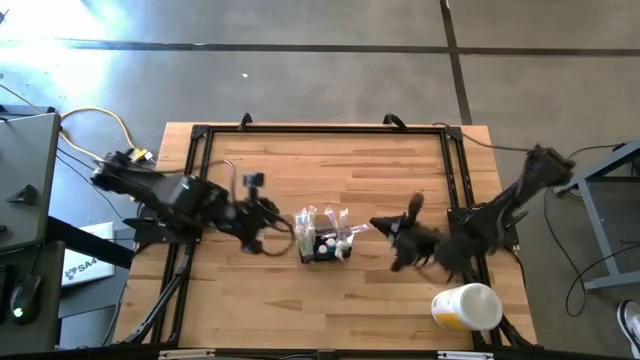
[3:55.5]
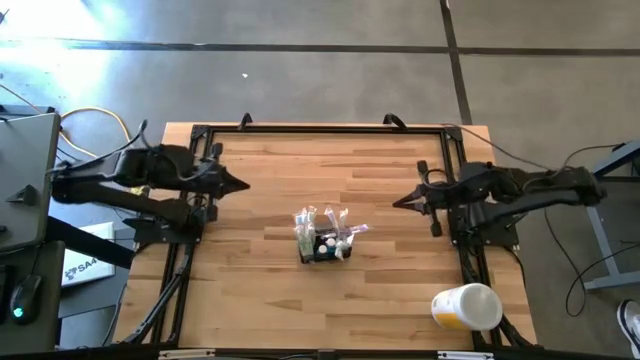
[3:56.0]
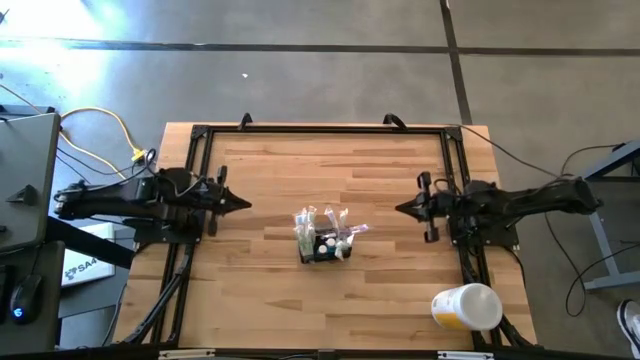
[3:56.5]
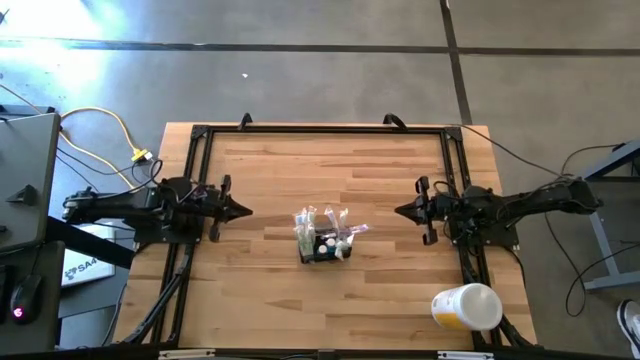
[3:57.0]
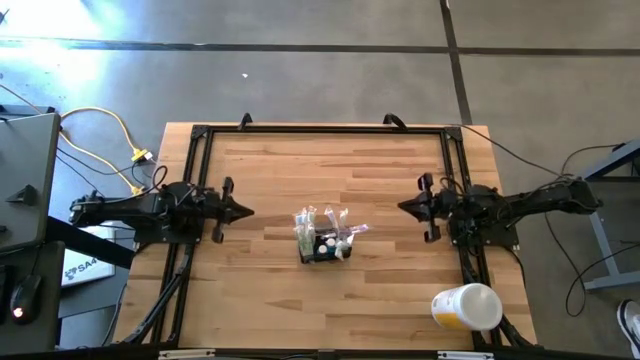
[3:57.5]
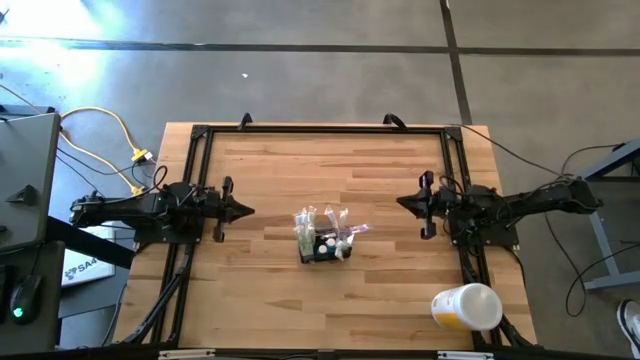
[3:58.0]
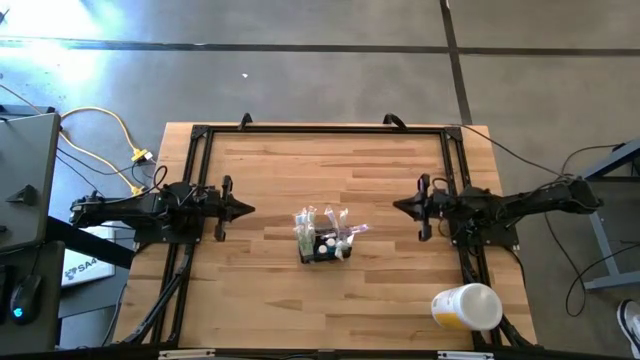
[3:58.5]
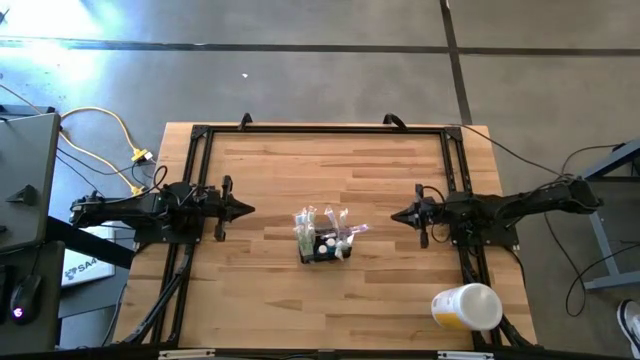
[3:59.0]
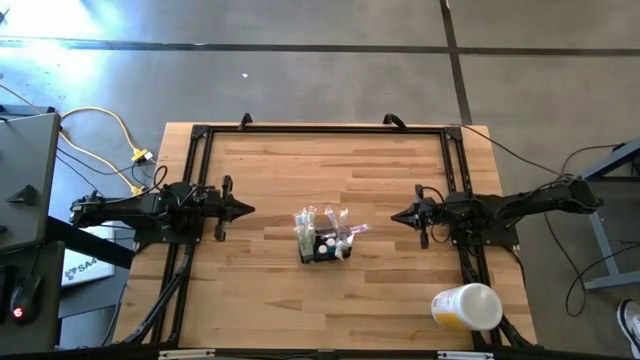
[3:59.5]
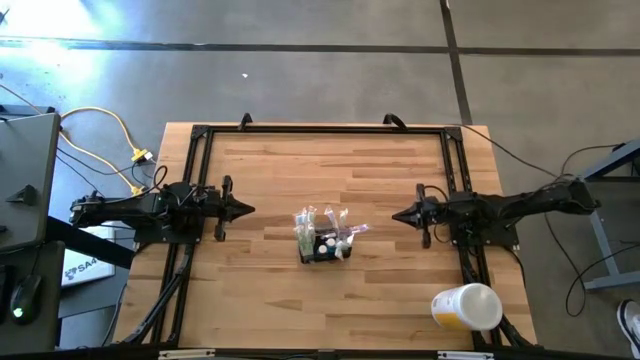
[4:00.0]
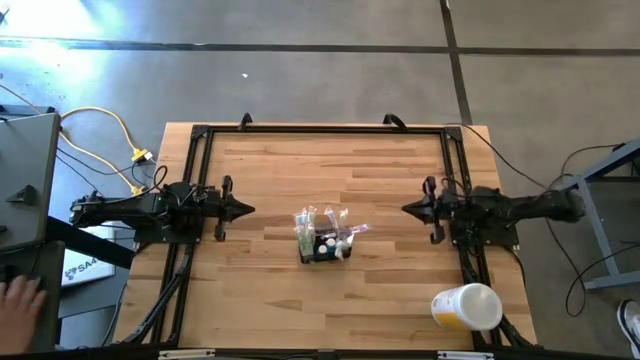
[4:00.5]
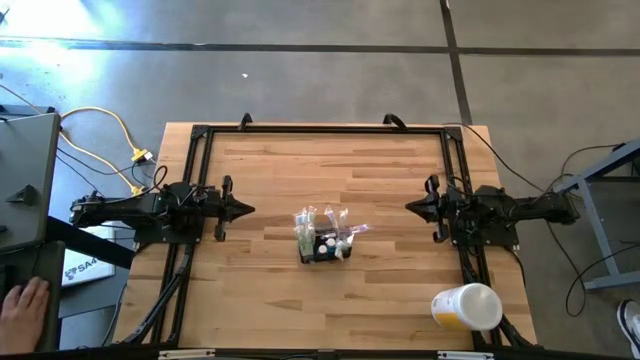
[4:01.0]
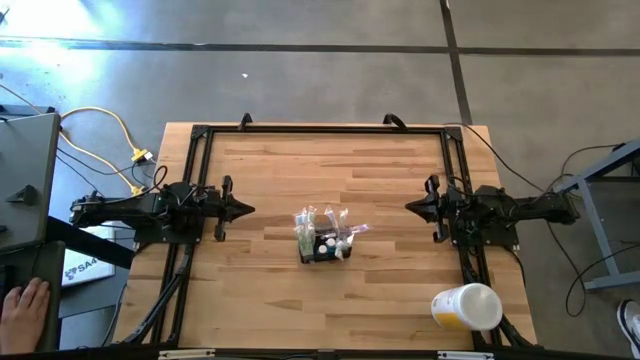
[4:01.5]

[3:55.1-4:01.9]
Task: Pick & Place toothbrushing station
Return to Home Position

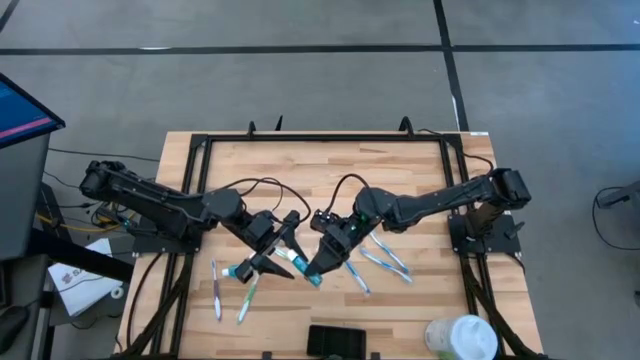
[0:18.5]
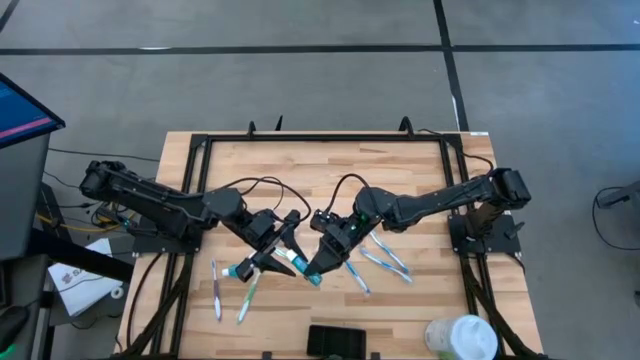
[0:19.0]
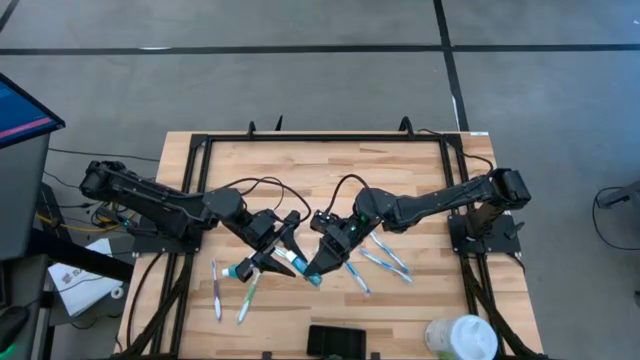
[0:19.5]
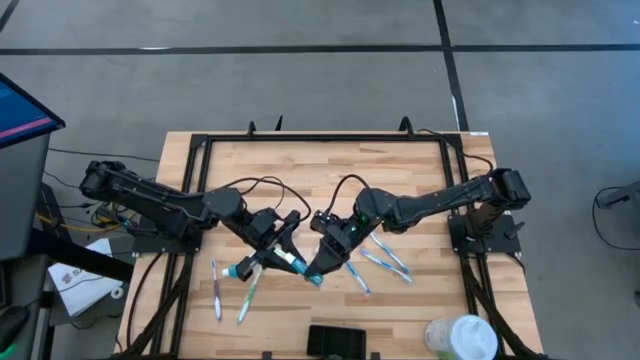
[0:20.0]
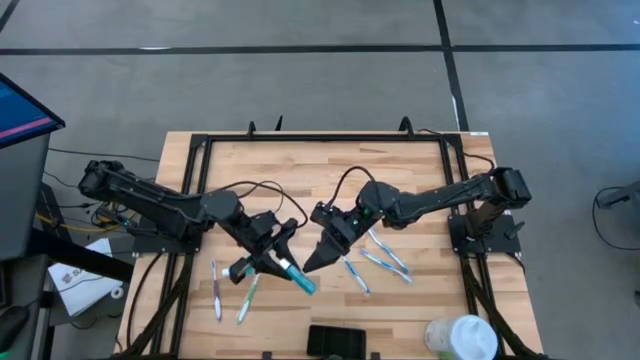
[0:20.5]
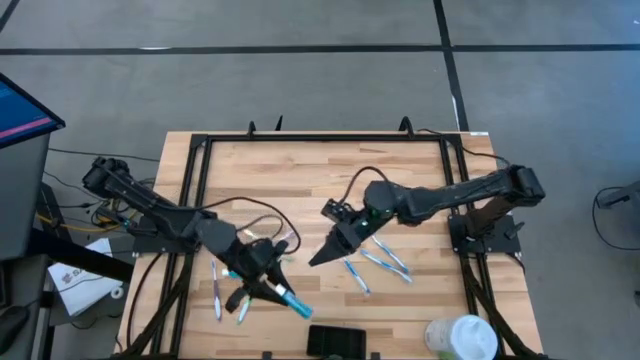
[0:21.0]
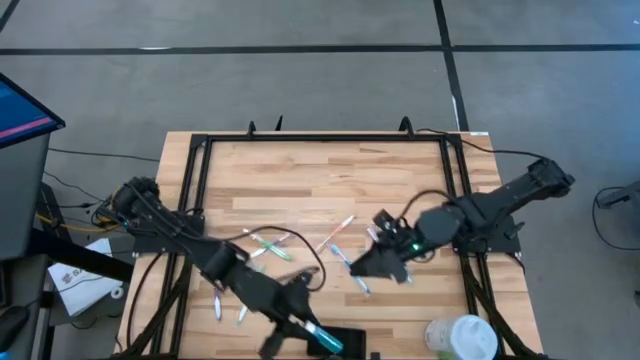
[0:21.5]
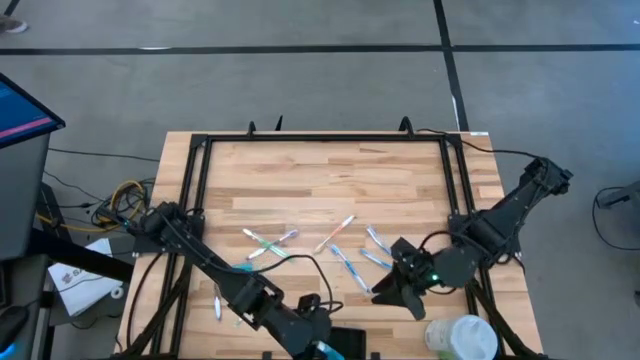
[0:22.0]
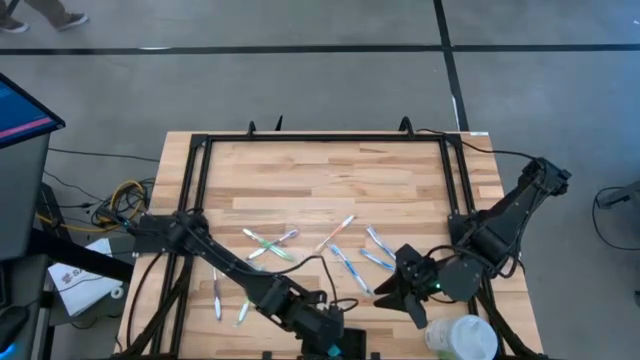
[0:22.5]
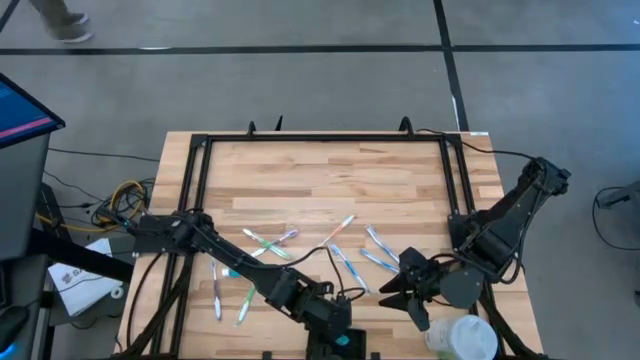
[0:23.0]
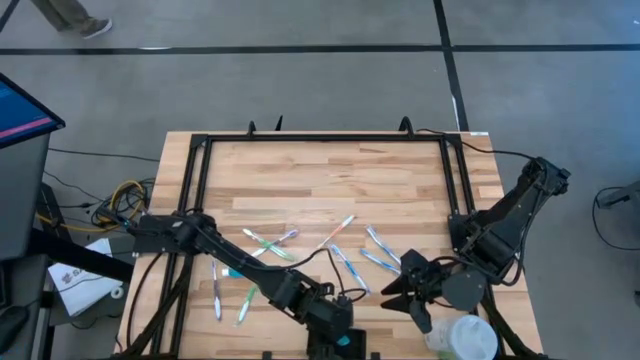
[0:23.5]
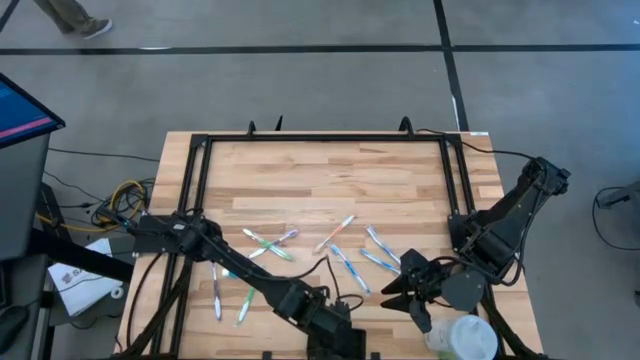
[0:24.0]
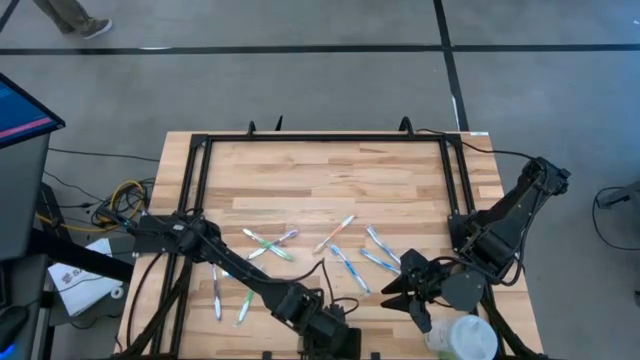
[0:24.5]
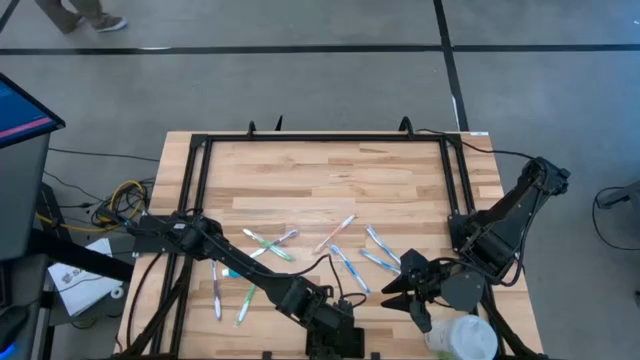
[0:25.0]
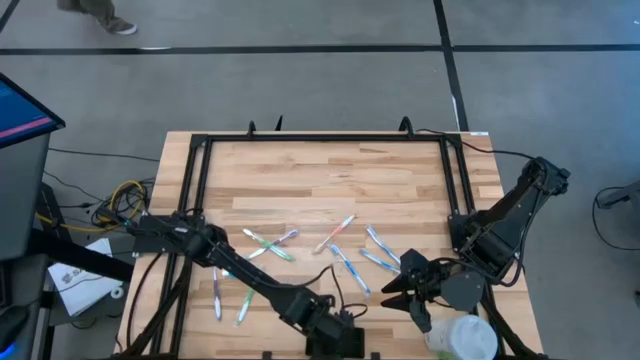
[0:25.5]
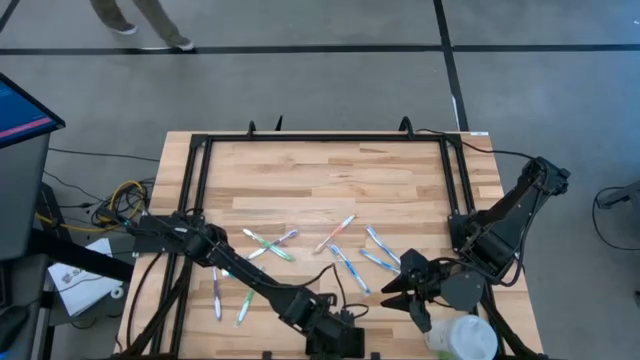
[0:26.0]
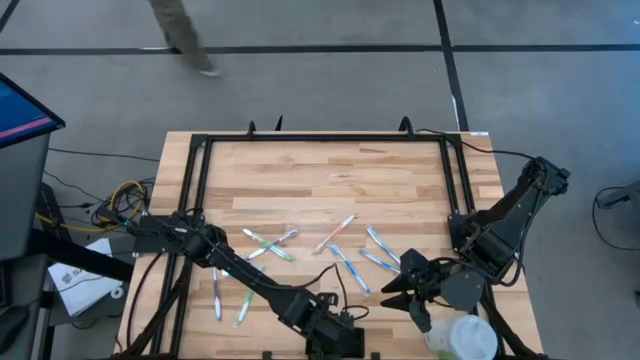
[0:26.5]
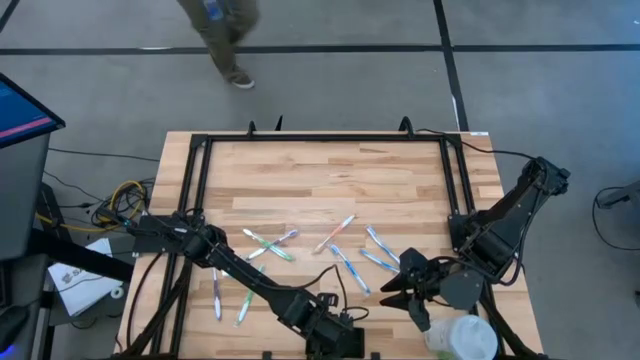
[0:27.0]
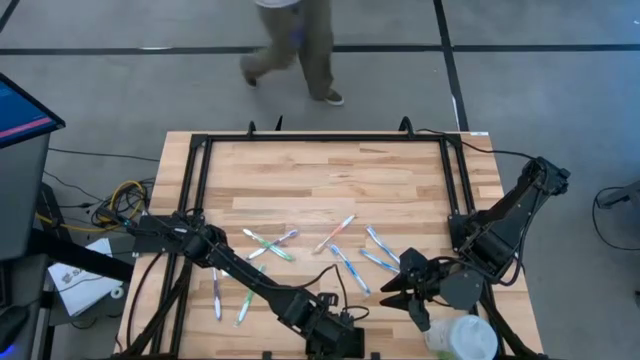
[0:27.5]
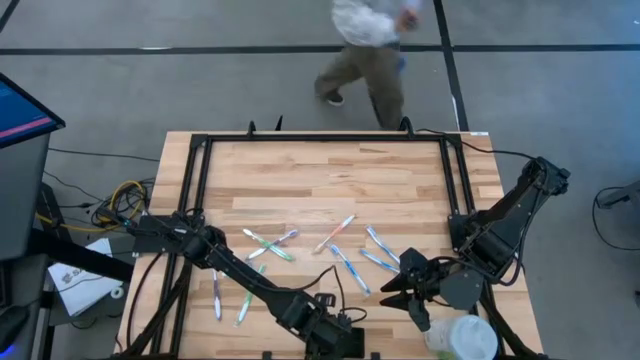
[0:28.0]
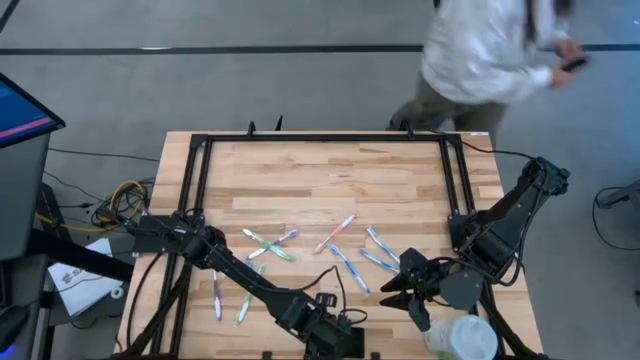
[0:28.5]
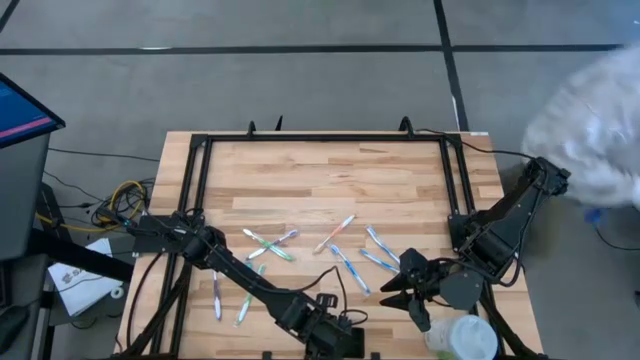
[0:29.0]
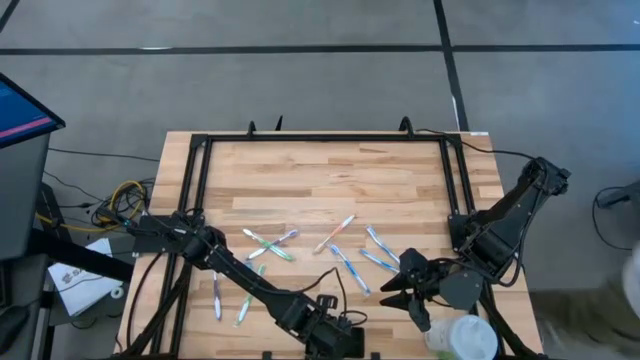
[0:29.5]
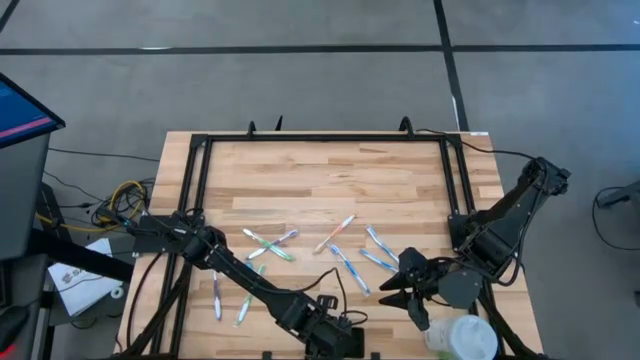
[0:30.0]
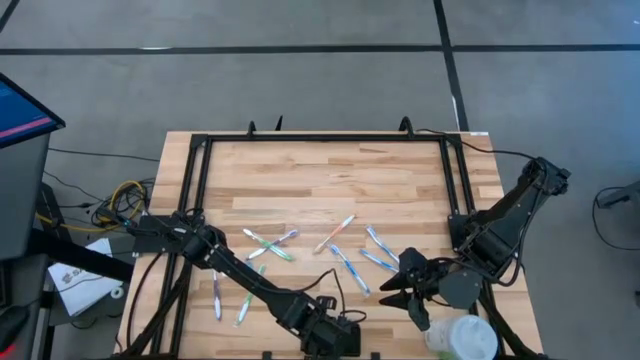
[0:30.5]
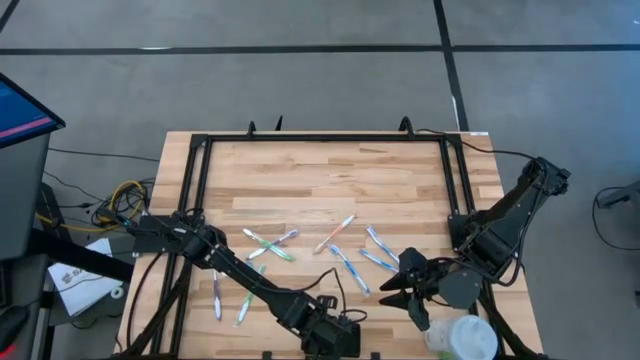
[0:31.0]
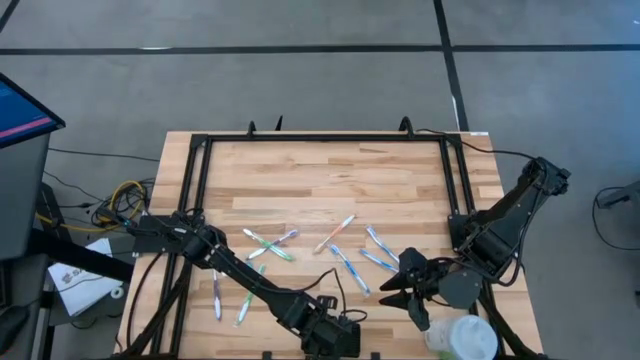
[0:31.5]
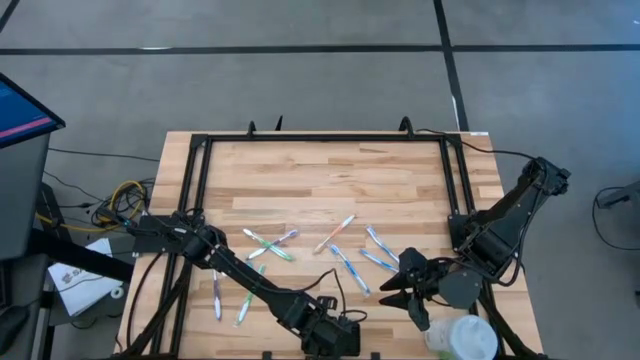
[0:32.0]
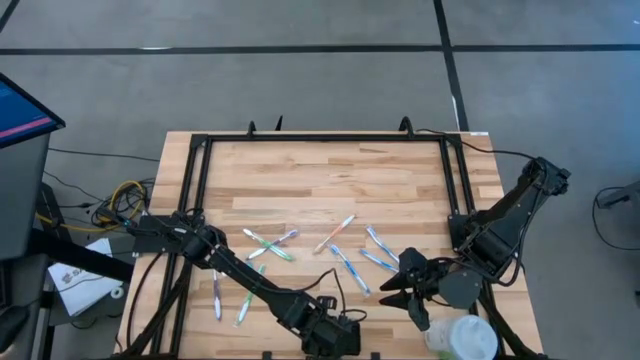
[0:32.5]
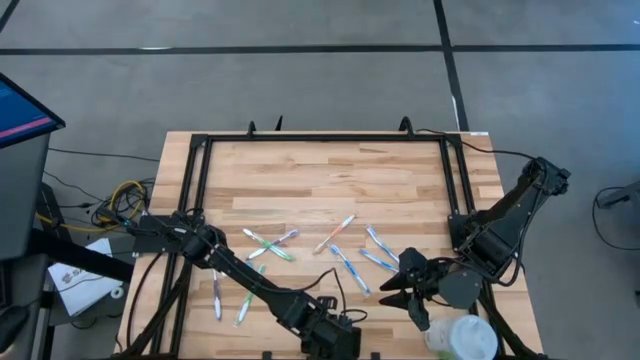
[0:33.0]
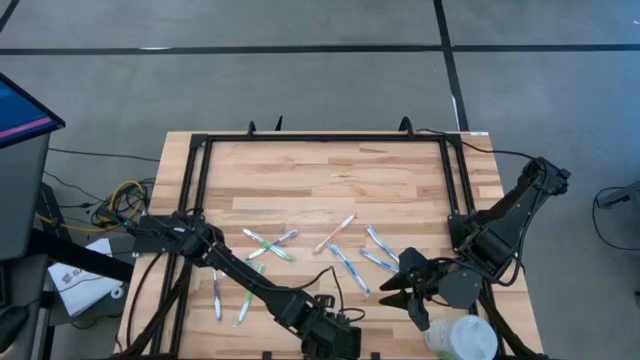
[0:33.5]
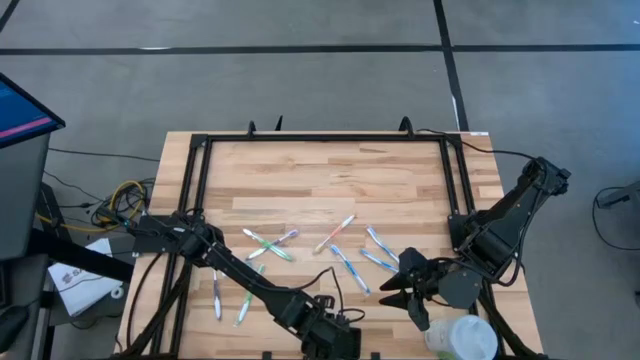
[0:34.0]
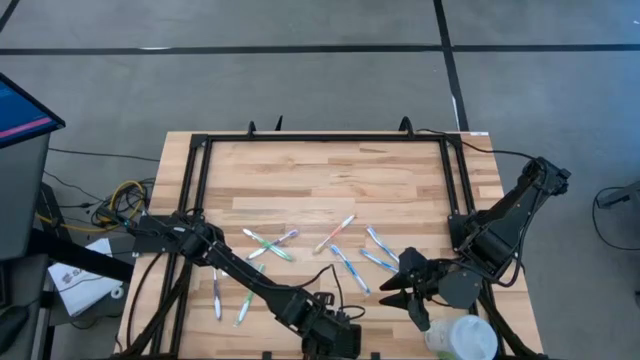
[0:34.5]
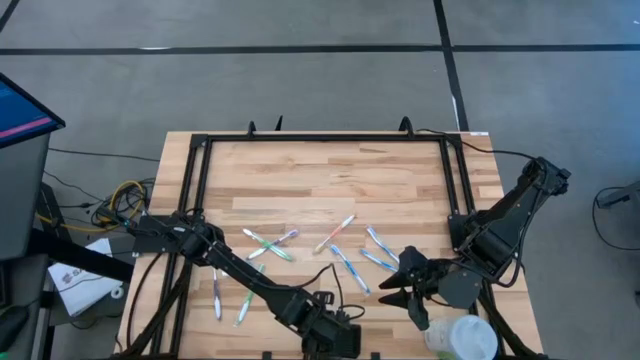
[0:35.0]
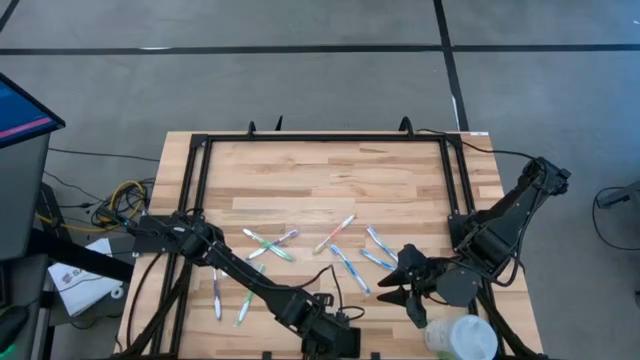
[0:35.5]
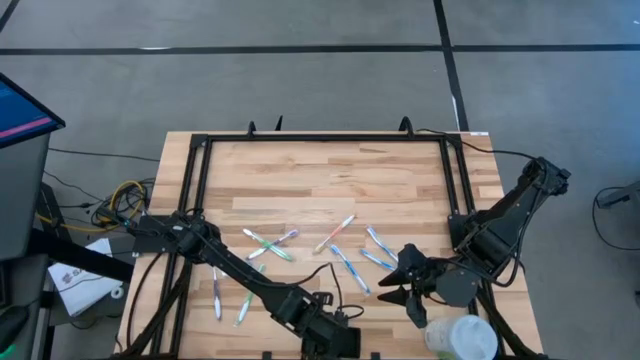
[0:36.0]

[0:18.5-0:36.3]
Task: Pick & Place toothbrushing station
Put the right blue mouthwash into the black mesh organizer
